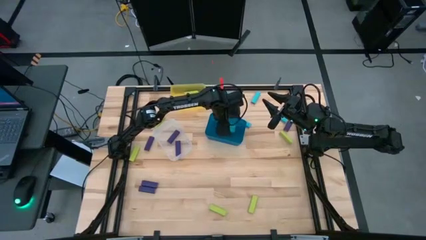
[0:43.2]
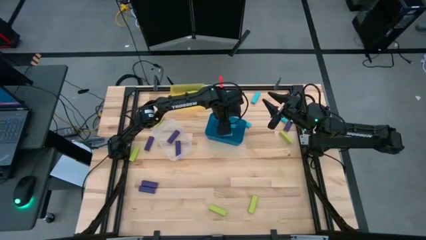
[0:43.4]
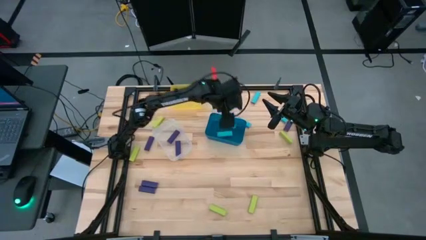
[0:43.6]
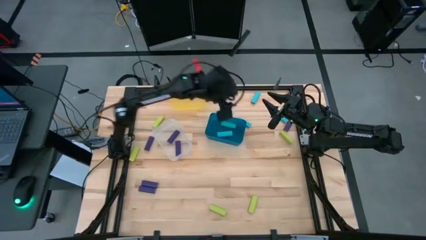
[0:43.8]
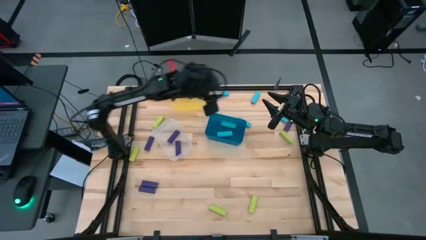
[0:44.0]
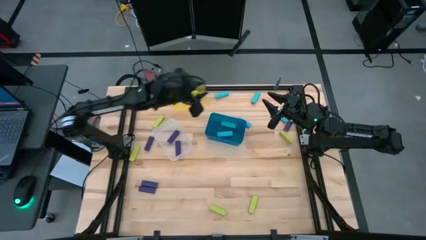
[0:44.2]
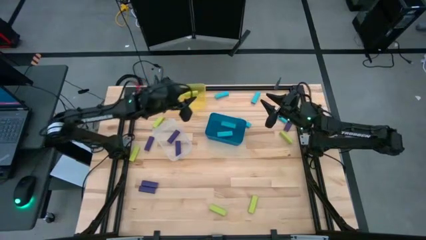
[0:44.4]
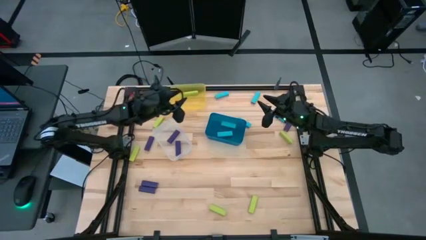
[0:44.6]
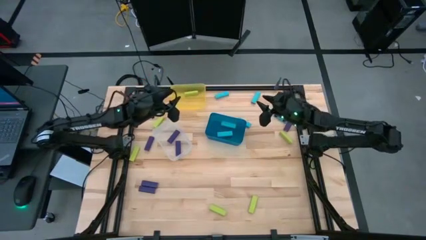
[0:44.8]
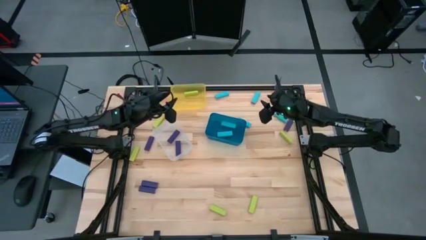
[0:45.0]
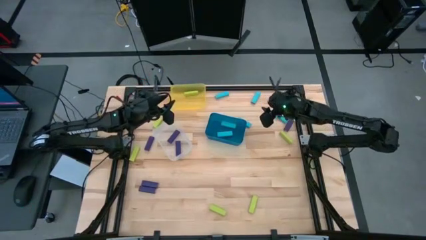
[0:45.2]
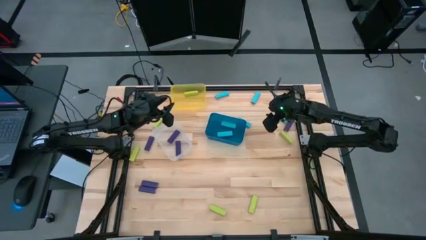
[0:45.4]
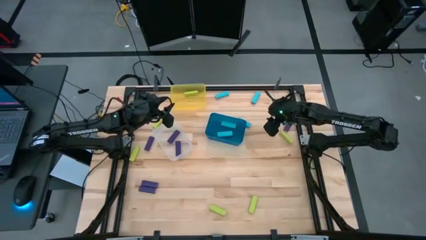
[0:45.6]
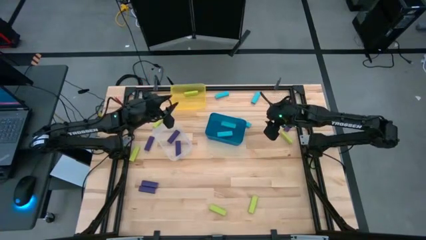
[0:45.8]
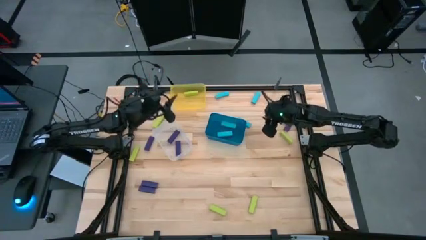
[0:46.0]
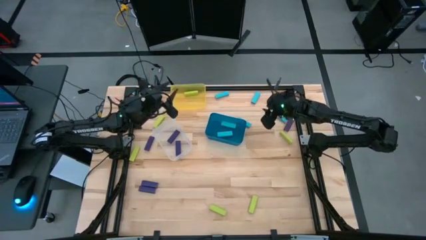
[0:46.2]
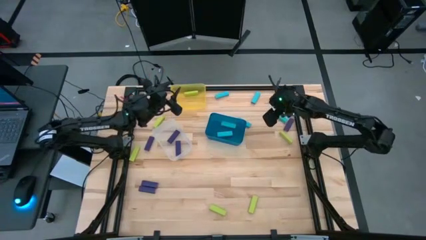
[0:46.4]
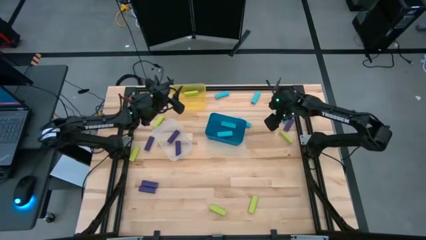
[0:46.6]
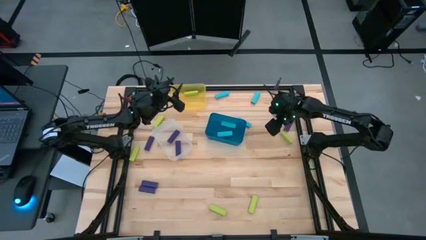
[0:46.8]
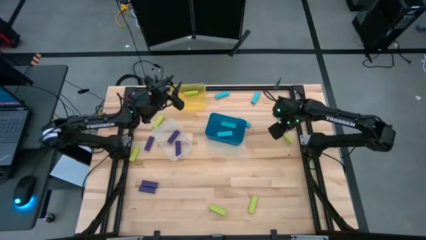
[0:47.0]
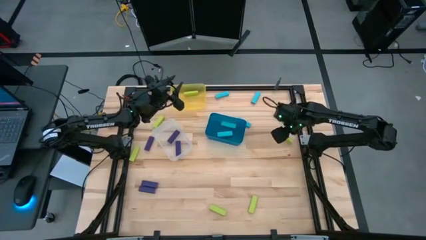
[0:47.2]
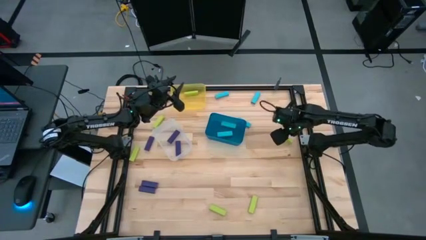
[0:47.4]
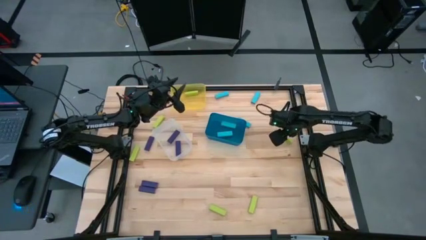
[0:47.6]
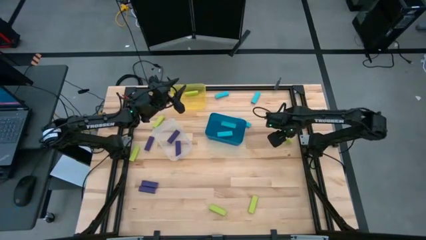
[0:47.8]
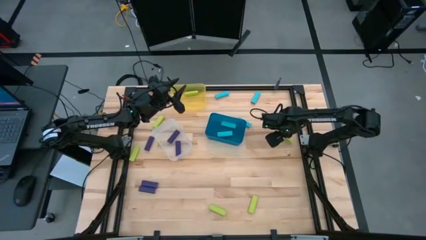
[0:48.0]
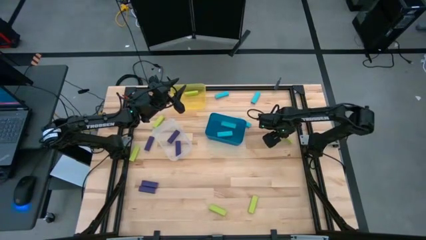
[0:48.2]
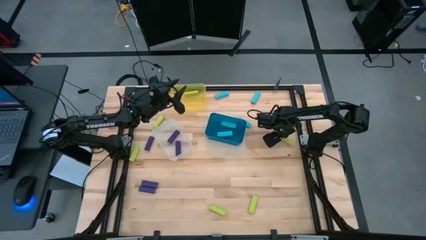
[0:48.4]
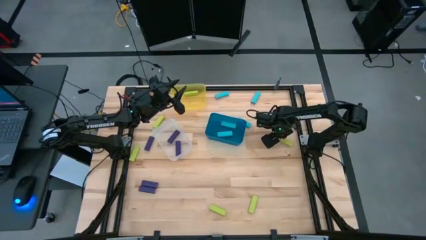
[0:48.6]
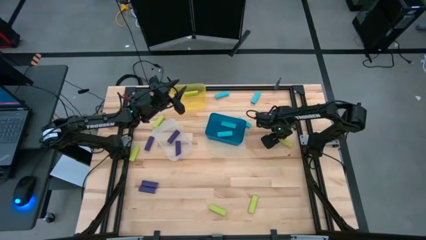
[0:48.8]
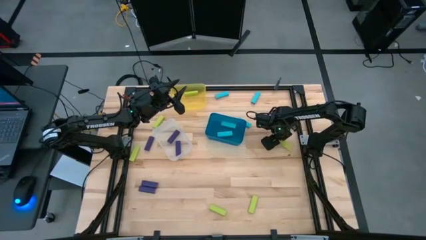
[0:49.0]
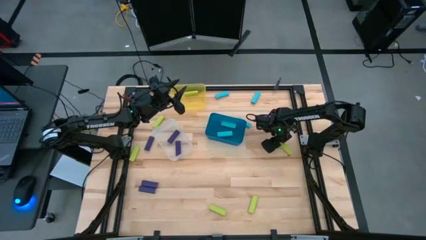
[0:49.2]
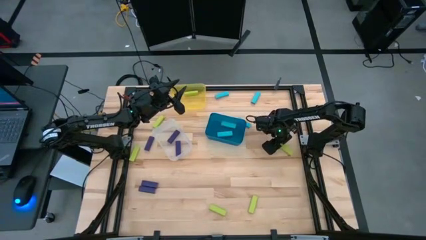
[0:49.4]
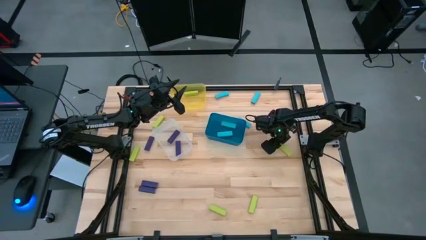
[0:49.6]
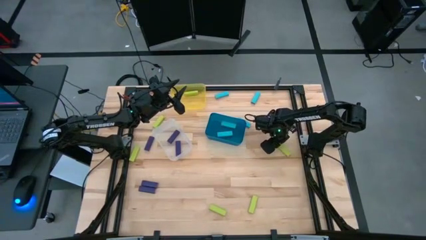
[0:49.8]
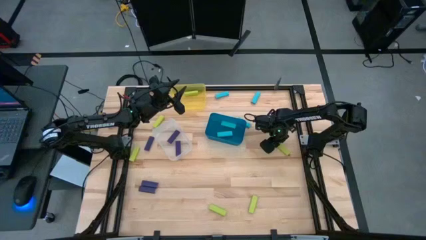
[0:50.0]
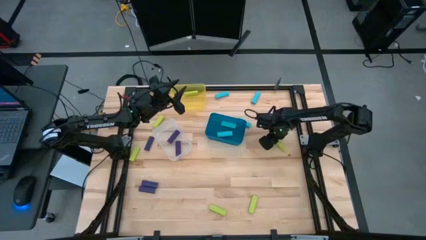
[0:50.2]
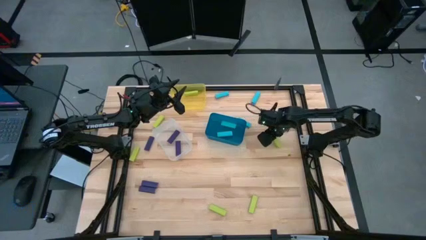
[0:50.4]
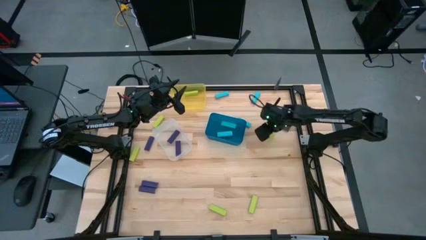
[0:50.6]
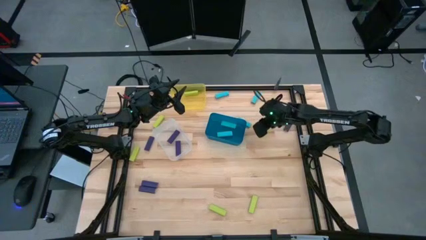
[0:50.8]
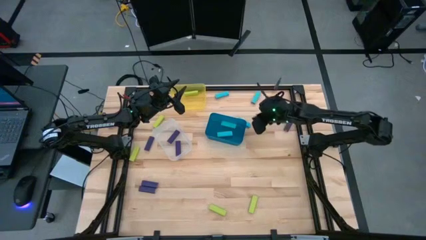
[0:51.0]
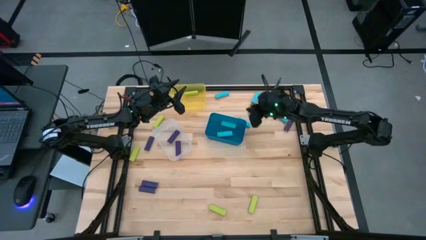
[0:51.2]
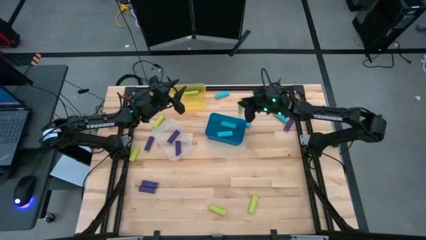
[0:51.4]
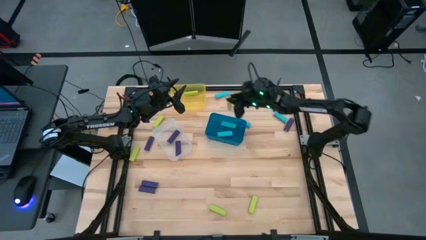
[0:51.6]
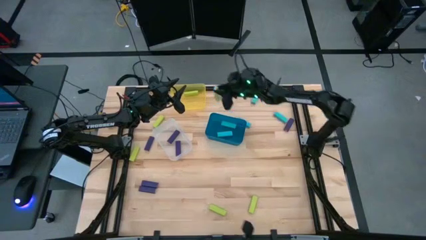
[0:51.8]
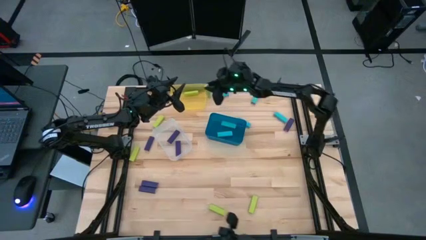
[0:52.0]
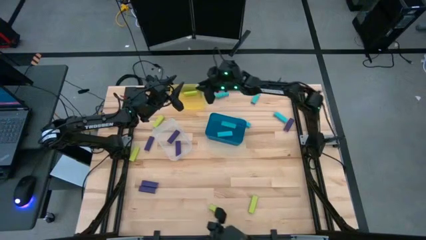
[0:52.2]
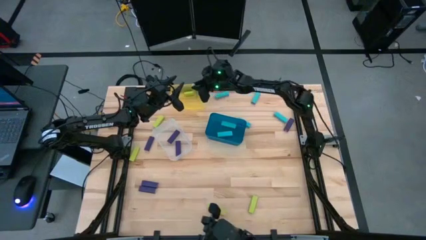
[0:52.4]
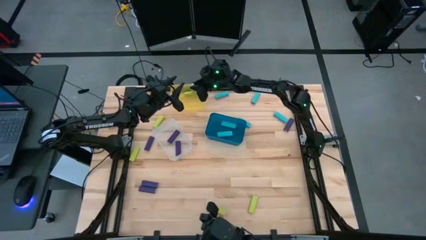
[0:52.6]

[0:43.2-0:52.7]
Task: Sort blocks
Put the green block into the yellow bin

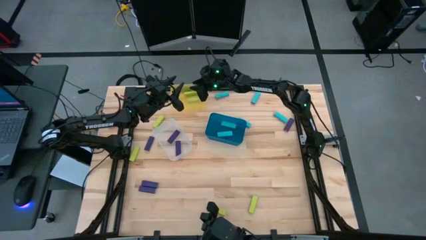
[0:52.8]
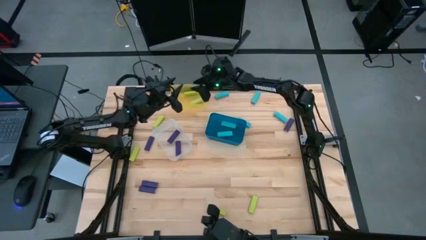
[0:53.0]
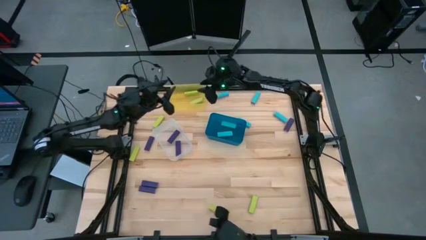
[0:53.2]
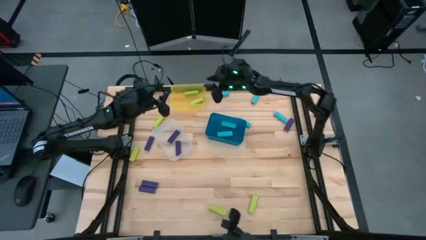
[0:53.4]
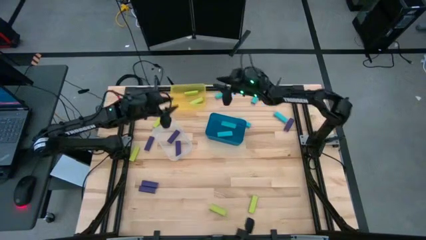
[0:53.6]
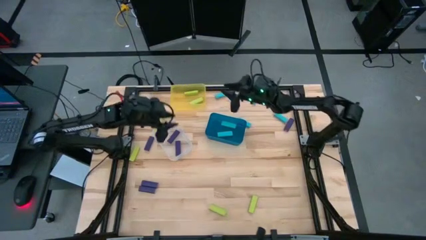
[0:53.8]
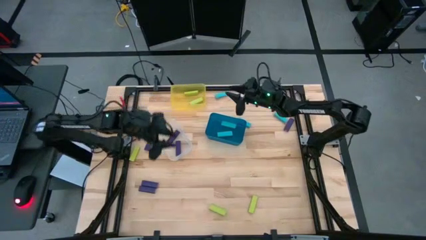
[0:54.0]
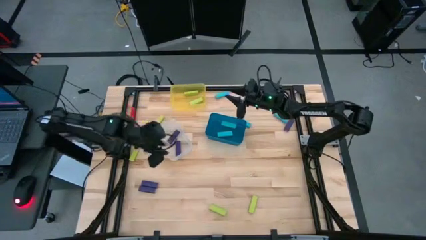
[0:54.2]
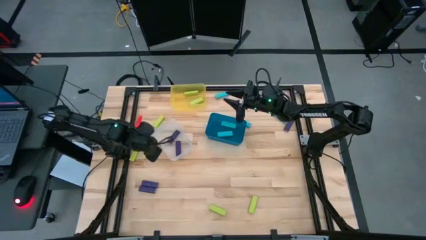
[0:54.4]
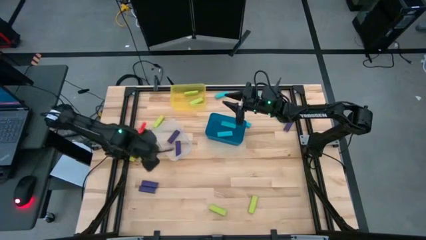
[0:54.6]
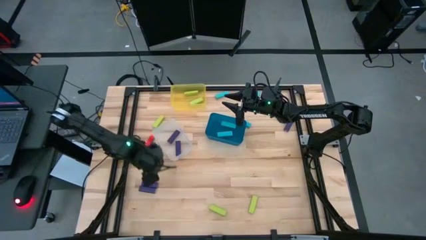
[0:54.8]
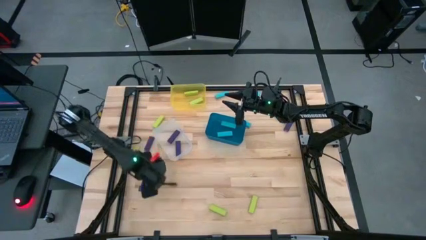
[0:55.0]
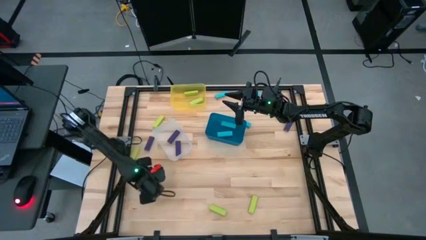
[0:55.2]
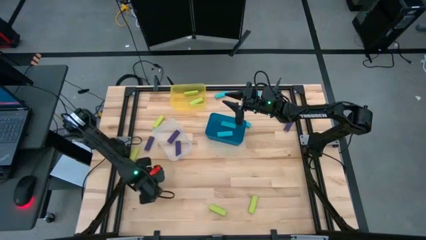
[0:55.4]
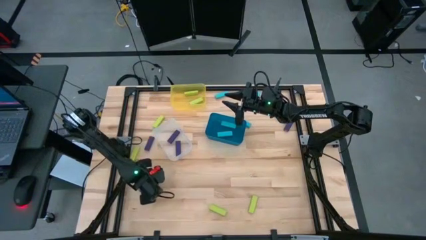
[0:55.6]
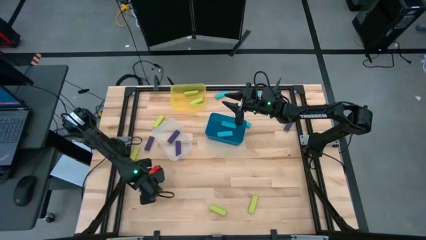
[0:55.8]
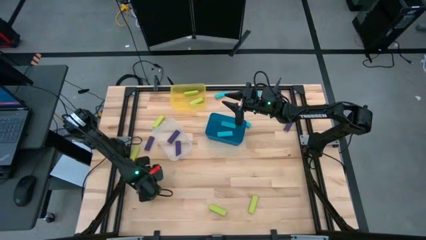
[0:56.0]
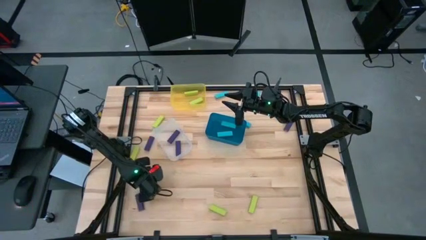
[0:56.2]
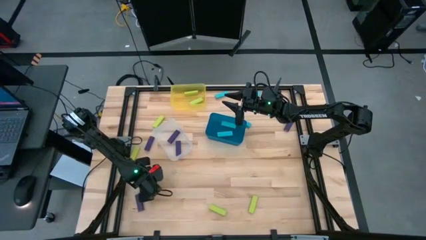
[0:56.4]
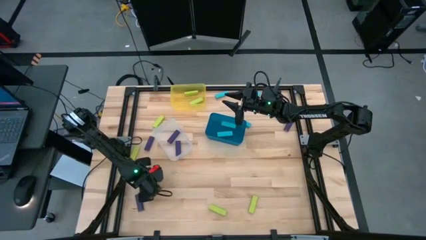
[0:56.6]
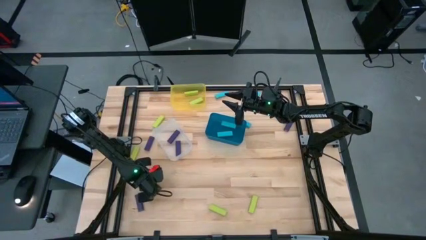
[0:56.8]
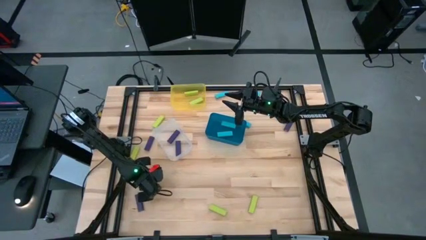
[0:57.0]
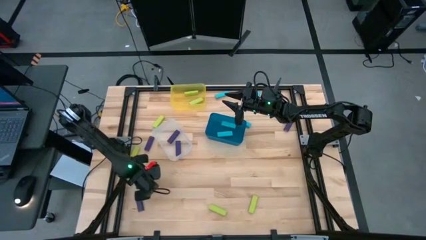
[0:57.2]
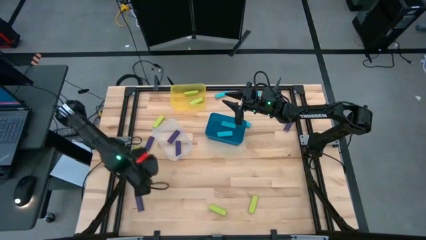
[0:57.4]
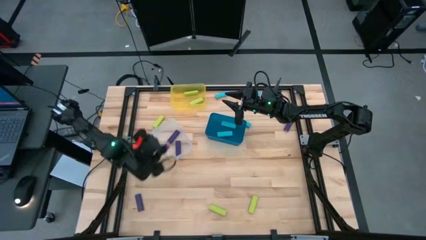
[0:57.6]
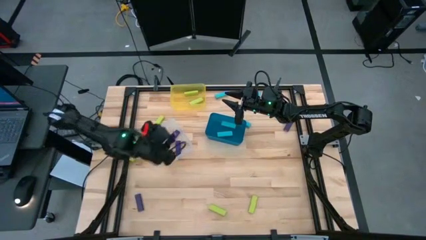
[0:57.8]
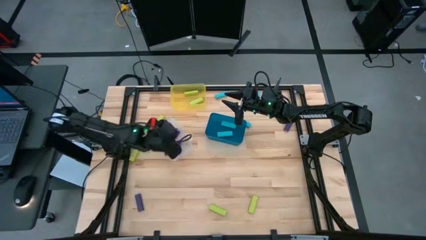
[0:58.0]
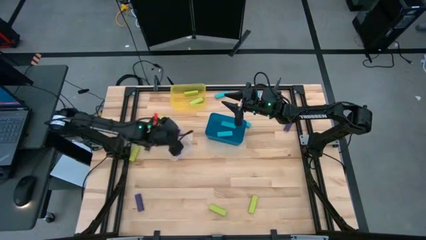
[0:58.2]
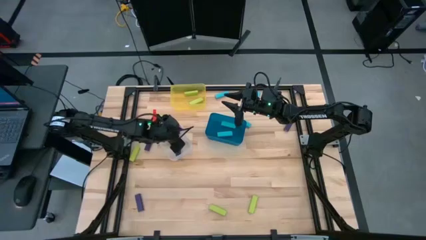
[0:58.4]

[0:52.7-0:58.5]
Put the violet block into the transparent bin

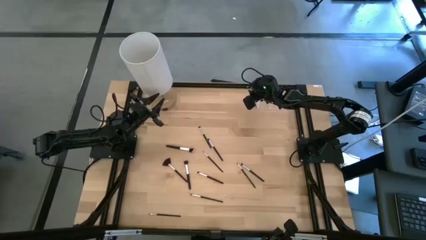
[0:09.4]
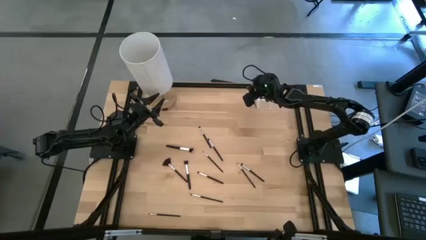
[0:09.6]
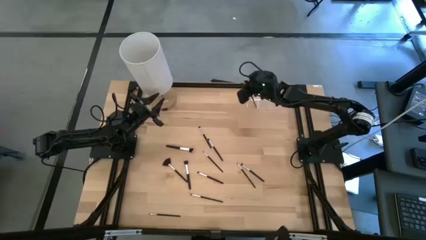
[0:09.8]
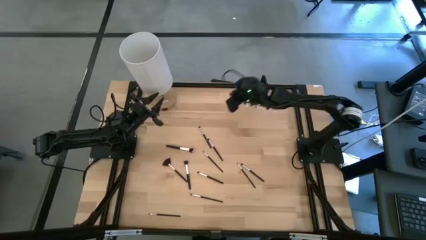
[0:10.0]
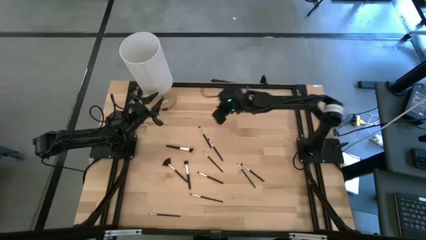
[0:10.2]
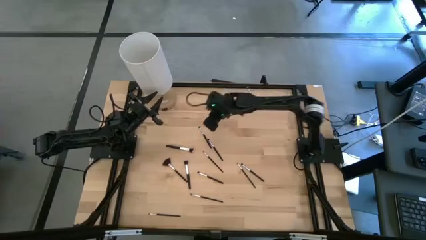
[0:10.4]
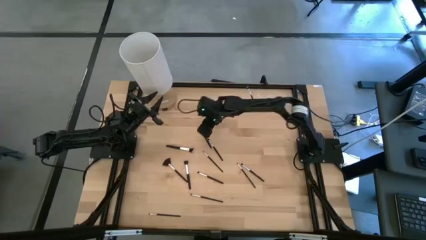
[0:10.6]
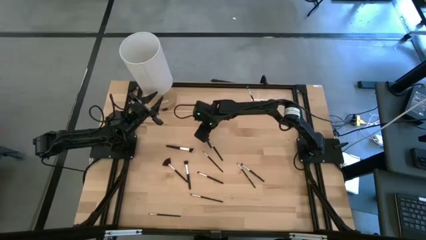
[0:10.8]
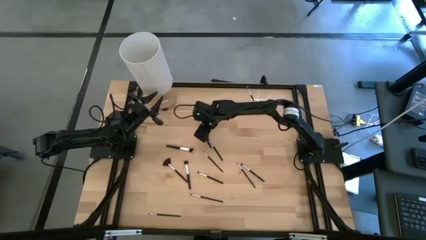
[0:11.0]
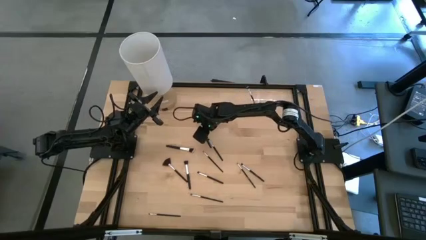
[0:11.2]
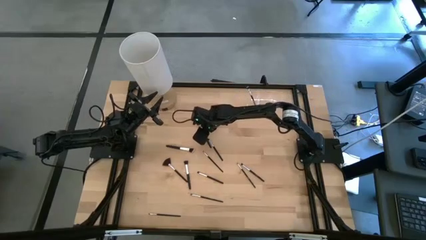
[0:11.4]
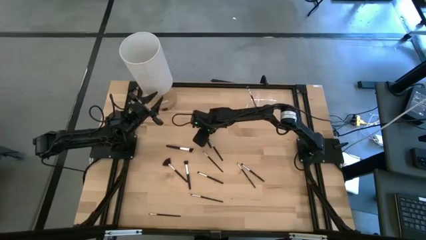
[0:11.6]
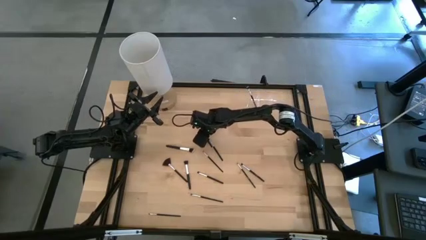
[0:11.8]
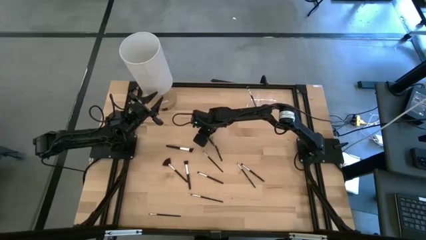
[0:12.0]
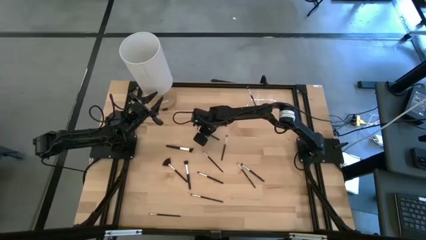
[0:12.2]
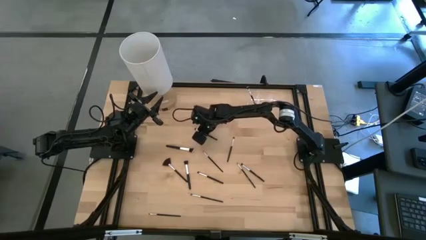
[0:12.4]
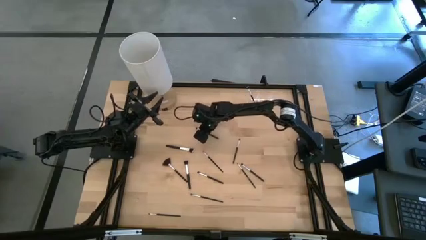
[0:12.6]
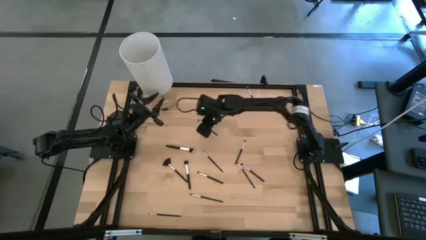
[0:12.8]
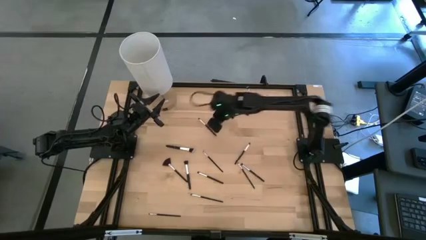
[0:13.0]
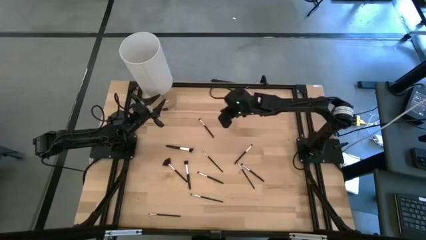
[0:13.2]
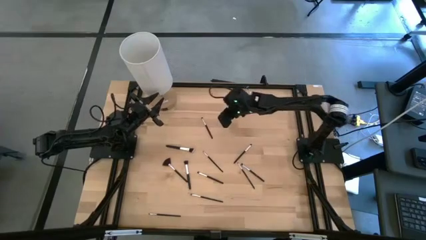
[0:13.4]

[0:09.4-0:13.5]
Task: Put items in baskets/containers
Put the eyeshadow brush into the left side of the transparent organizer
